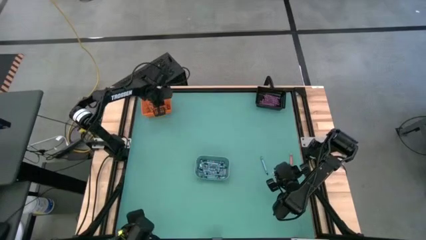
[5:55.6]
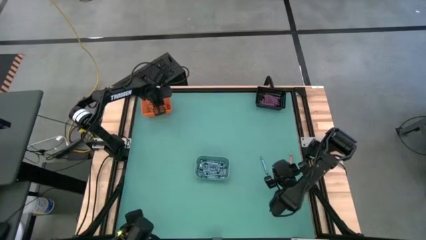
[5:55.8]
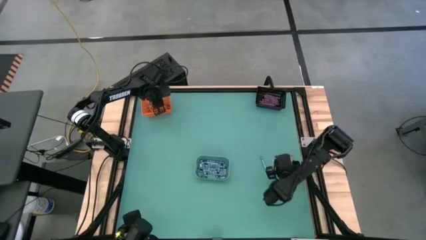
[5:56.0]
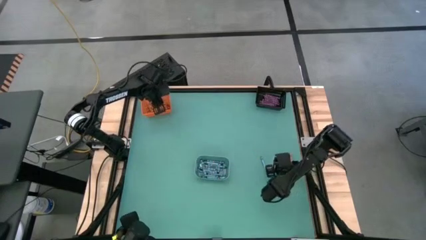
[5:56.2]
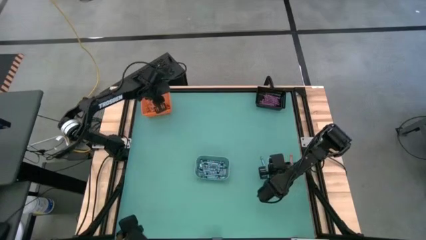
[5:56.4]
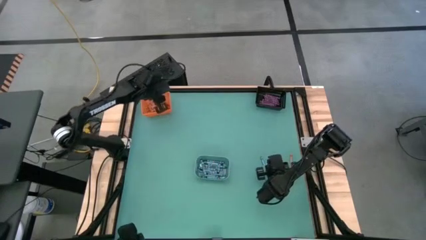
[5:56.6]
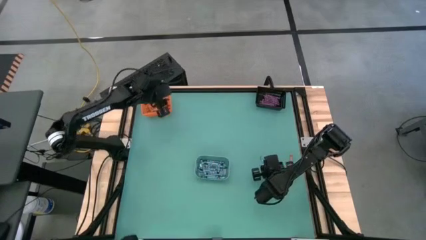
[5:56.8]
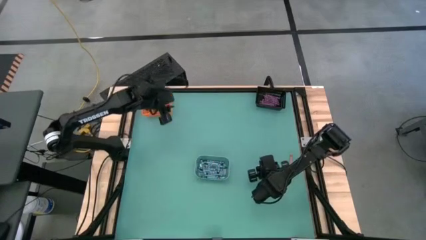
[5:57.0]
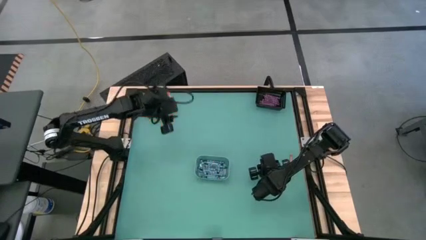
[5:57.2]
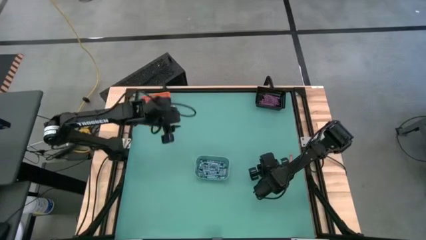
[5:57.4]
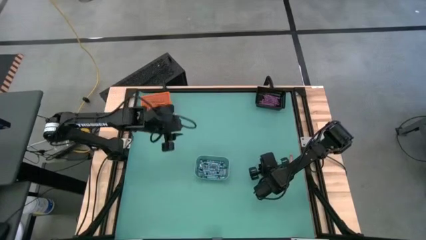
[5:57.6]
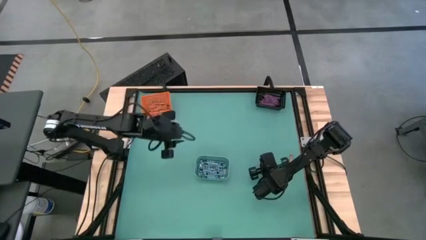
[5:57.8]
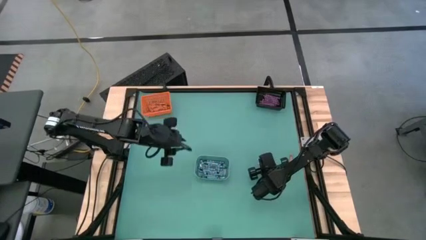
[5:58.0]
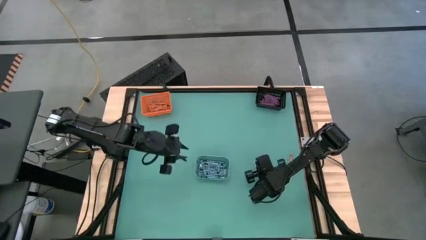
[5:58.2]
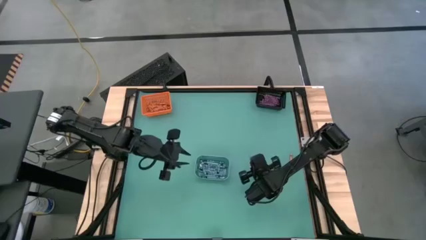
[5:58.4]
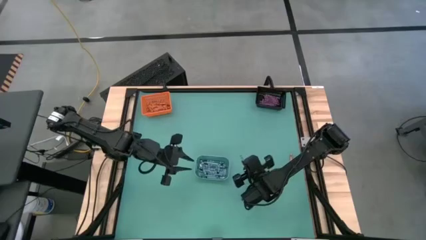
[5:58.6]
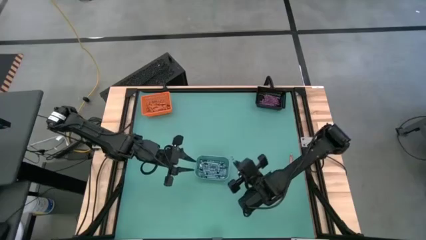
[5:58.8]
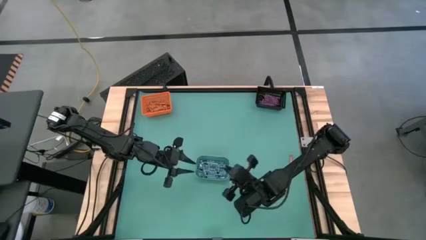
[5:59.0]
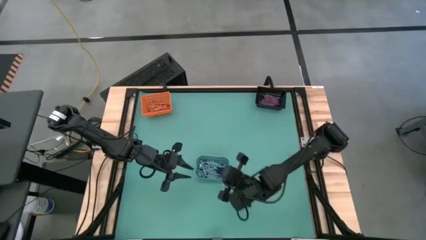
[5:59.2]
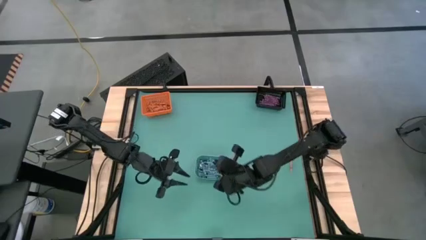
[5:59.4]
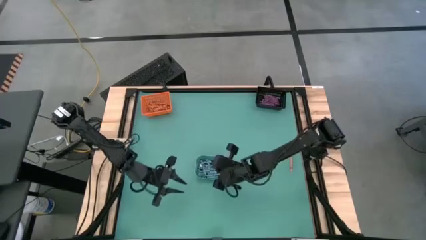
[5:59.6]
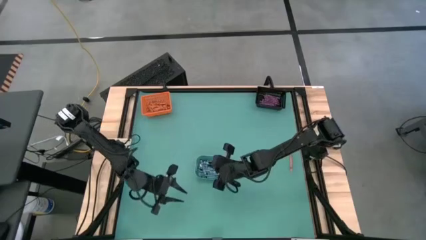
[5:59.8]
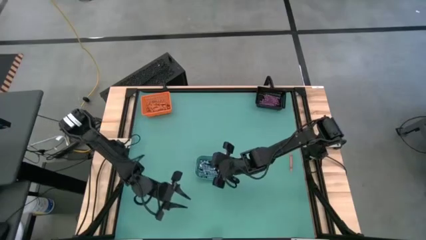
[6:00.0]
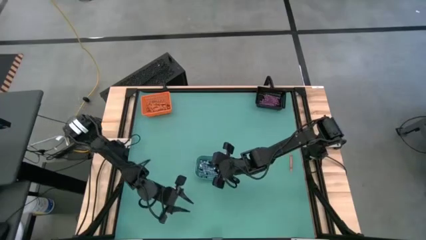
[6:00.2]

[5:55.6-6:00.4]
Task: Sort crayons
Put the blue crayon into the blue bin

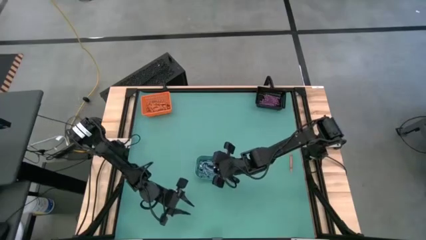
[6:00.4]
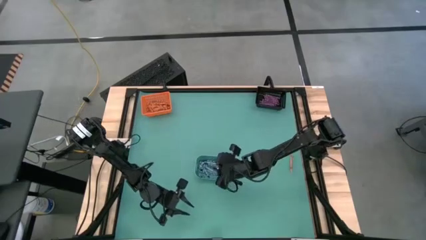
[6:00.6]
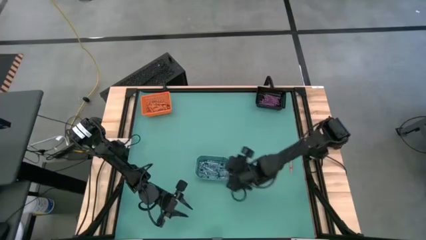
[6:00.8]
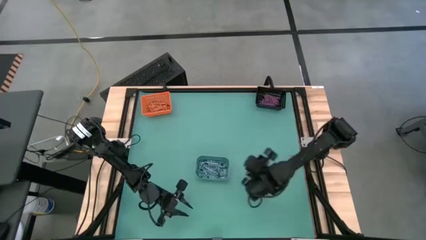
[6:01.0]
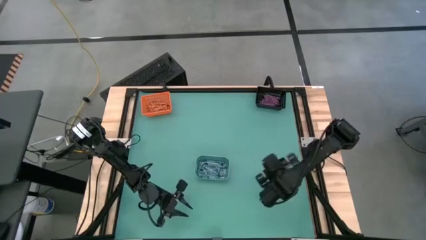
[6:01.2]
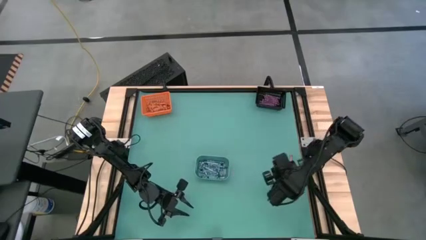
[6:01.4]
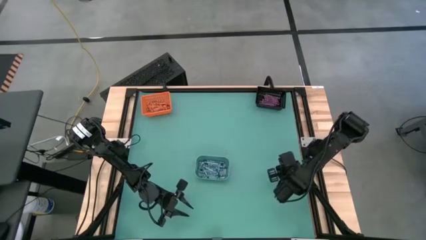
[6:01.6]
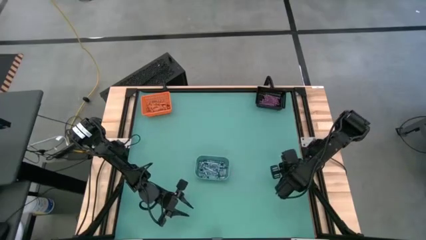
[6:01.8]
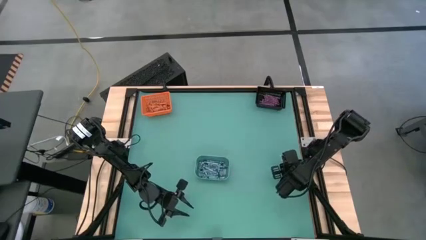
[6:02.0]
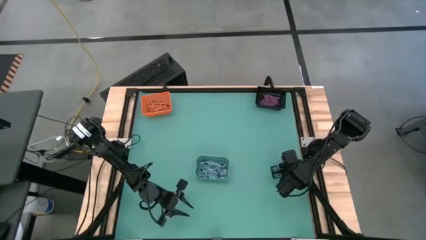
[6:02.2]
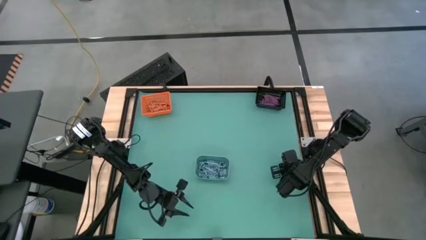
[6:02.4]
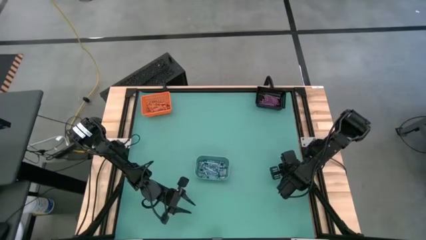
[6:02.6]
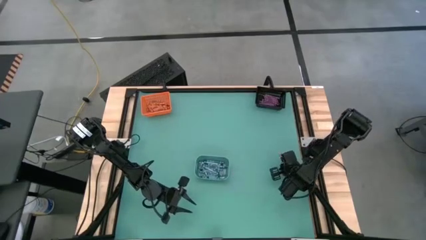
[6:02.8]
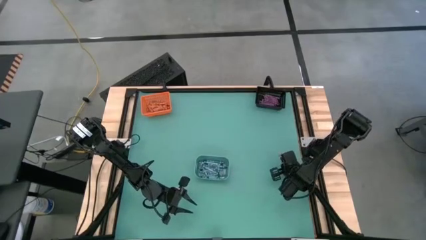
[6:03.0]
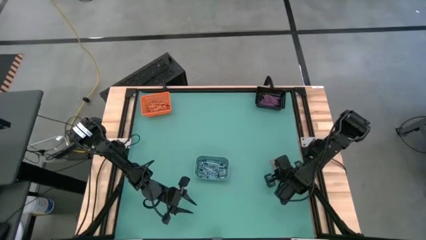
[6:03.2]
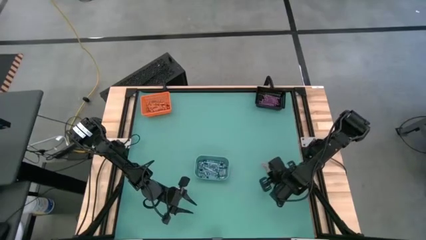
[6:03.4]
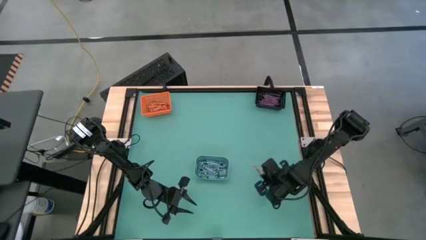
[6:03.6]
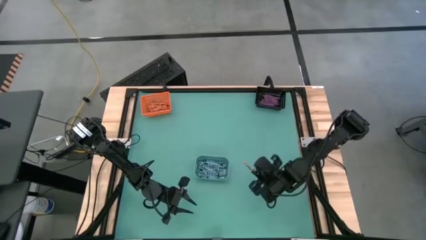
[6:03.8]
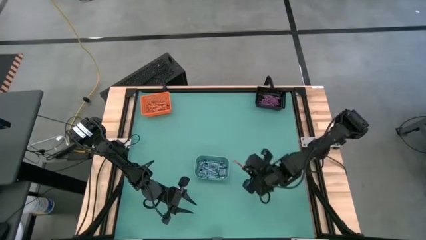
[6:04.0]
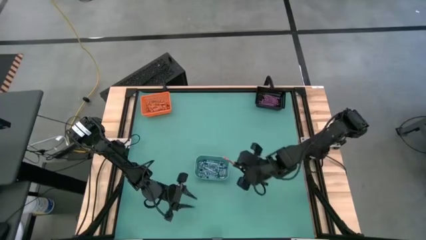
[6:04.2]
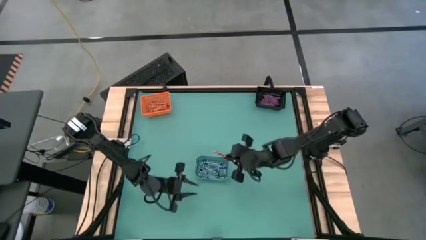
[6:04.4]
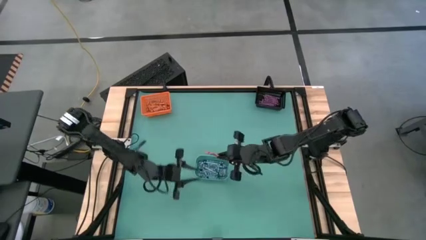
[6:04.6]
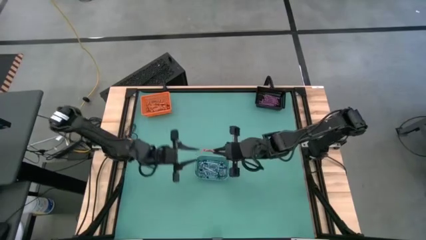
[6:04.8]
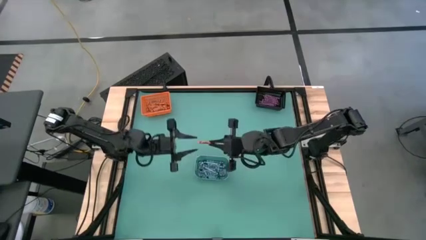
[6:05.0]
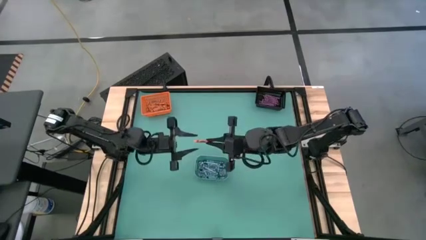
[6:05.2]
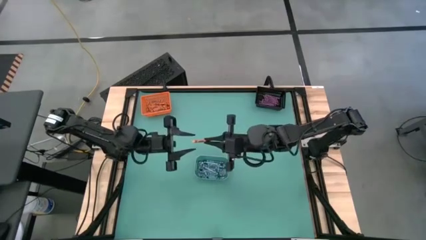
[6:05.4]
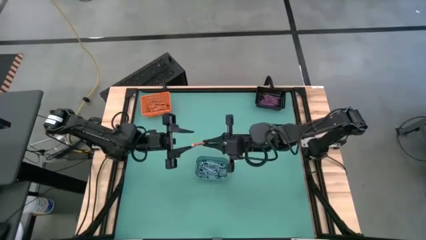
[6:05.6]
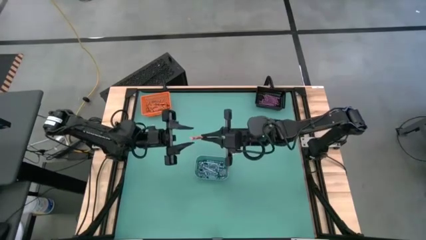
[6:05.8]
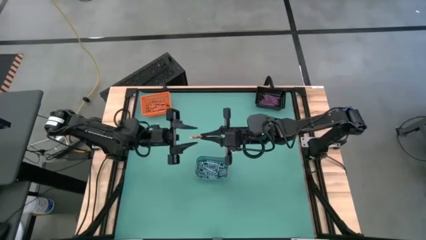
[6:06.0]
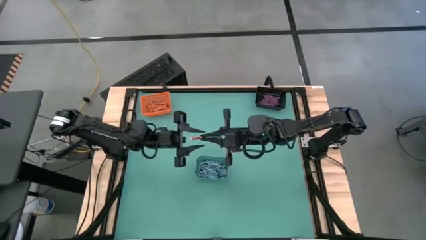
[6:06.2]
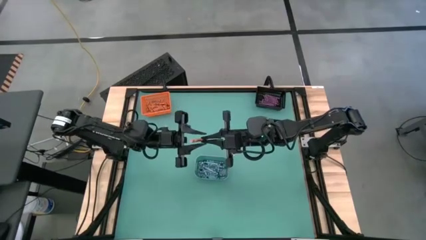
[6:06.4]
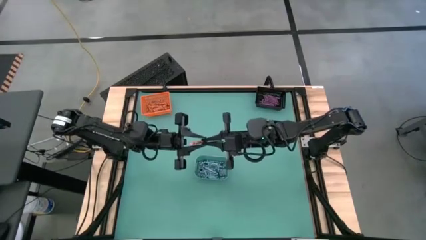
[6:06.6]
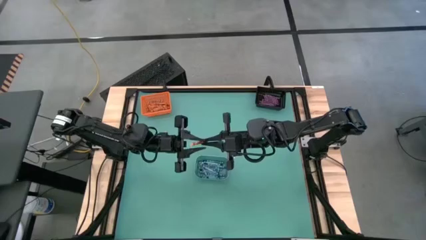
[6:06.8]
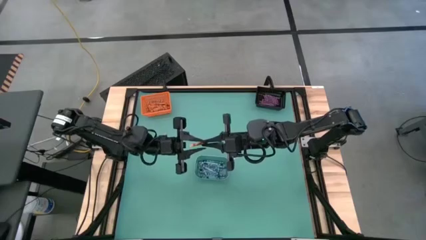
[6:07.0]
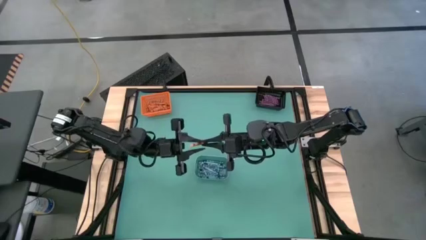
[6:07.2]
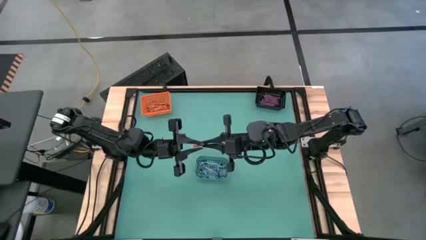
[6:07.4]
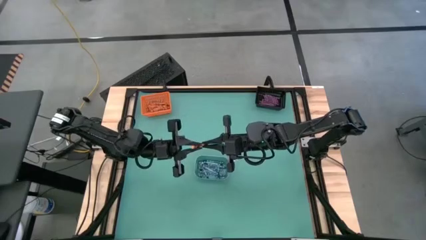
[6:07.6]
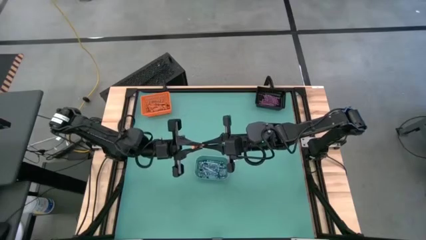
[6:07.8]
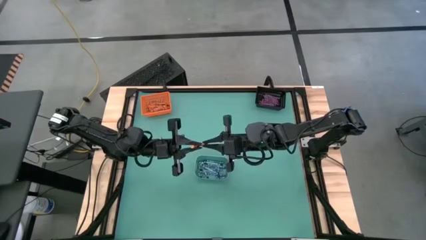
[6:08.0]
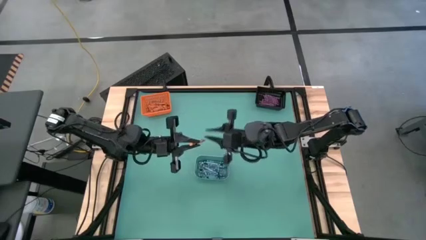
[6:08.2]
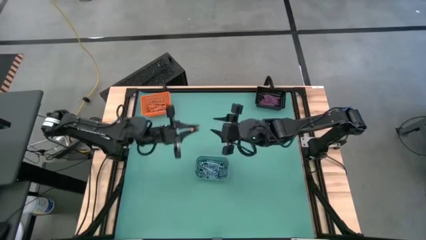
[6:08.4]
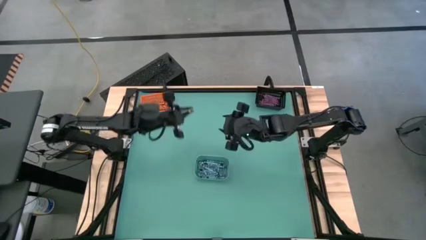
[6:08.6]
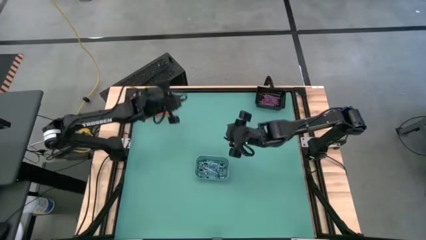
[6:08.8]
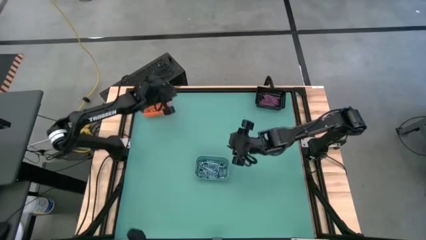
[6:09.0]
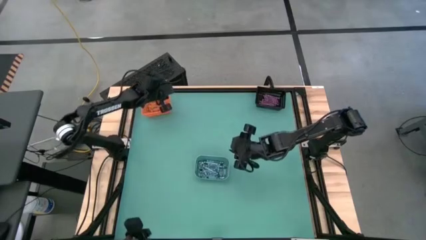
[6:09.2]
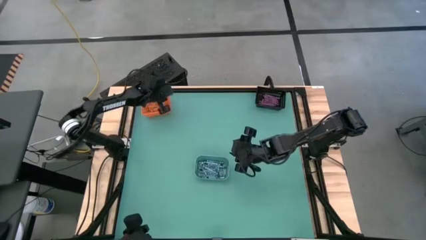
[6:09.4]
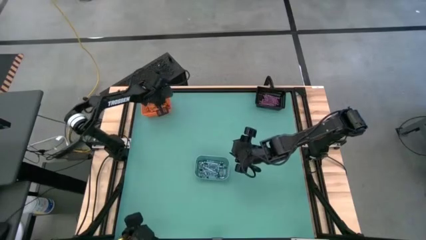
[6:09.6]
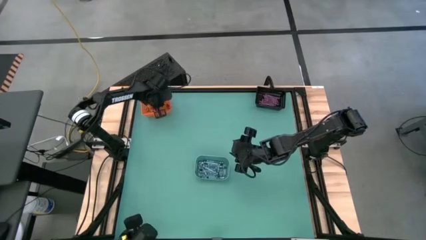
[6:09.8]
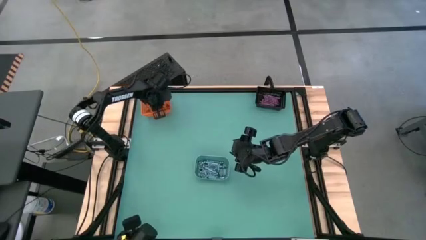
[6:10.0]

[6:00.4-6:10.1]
Put the orange crayon into the orange bin

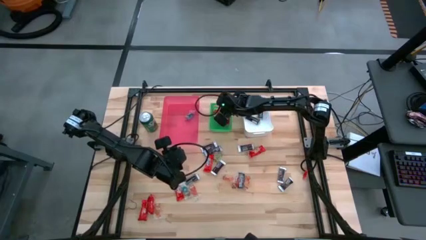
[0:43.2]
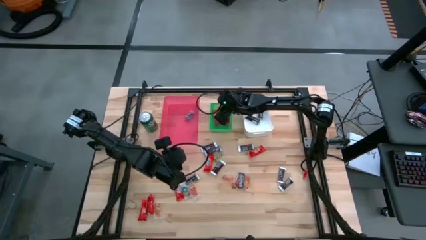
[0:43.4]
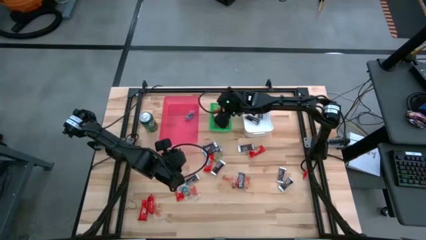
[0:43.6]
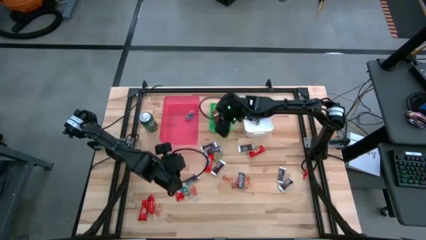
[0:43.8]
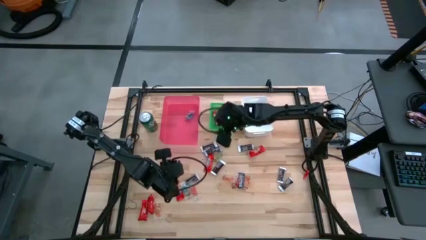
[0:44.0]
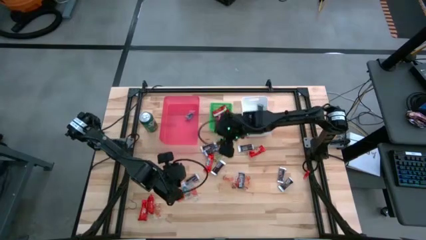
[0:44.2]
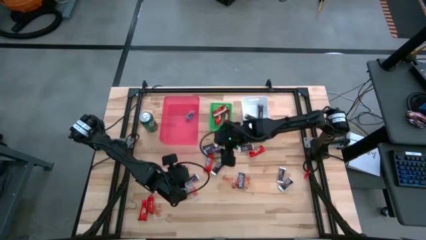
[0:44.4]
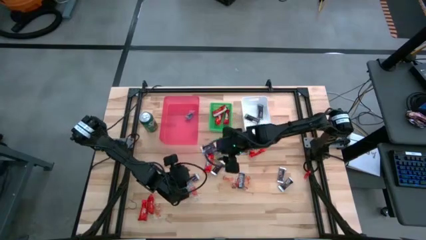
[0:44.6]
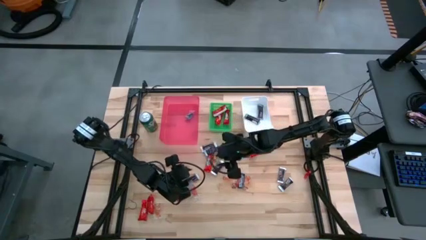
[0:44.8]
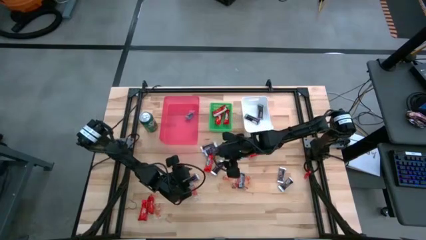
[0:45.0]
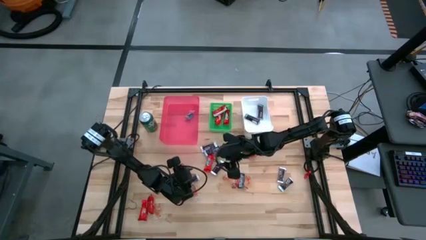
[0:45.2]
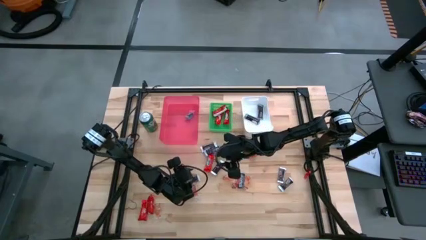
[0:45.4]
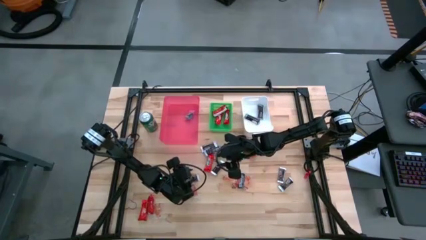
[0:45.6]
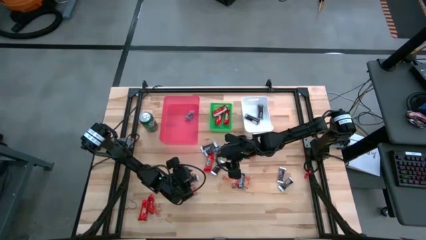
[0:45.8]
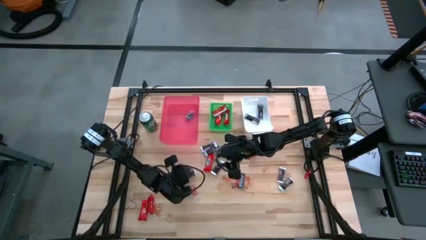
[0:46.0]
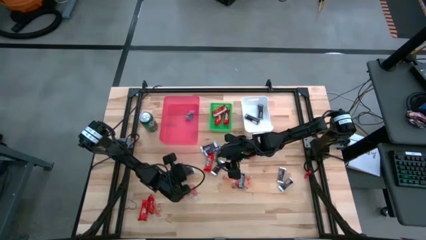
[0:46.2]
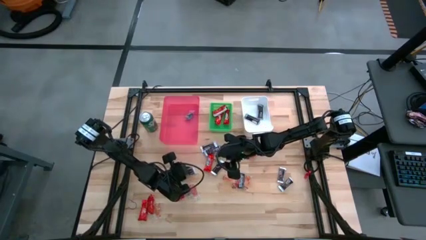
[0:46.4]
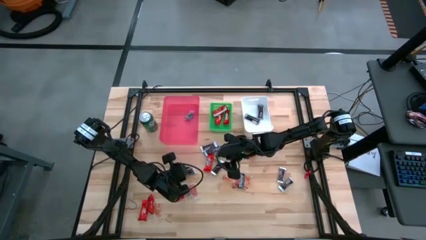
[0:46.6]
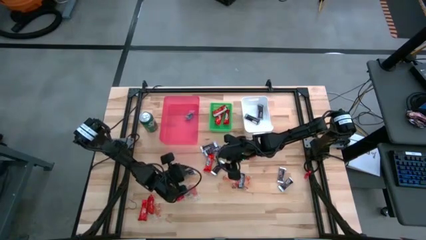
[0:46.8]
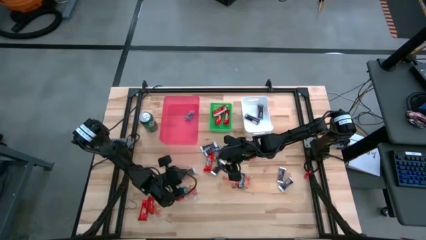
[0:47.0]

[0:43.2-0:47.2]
Task: Sort candy
Put the brown chocolate into the white bin
